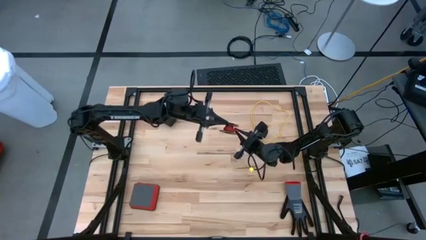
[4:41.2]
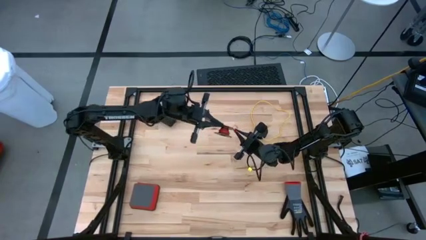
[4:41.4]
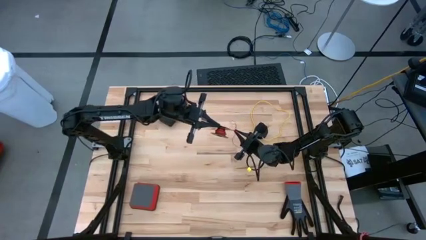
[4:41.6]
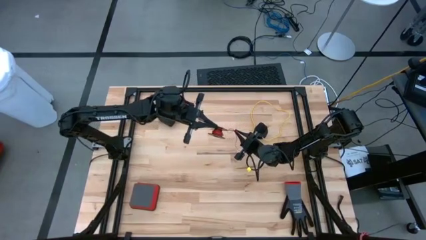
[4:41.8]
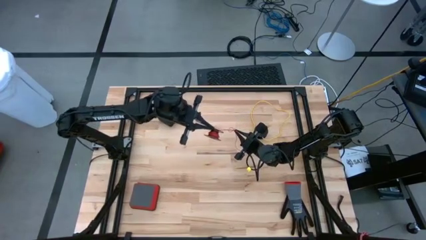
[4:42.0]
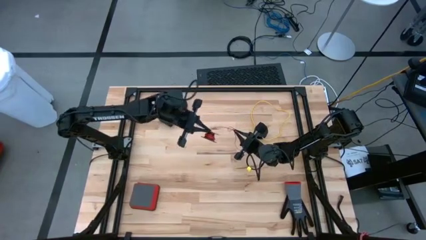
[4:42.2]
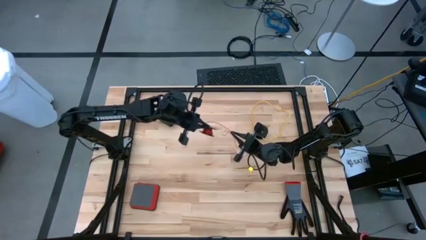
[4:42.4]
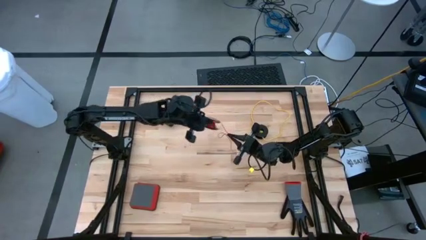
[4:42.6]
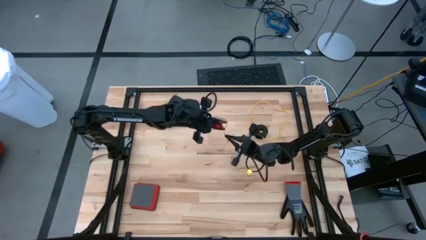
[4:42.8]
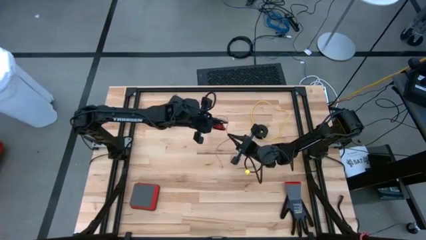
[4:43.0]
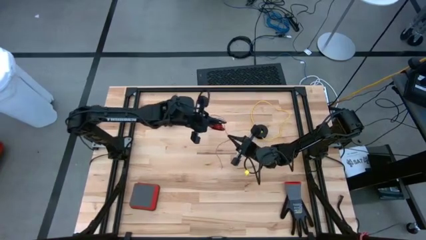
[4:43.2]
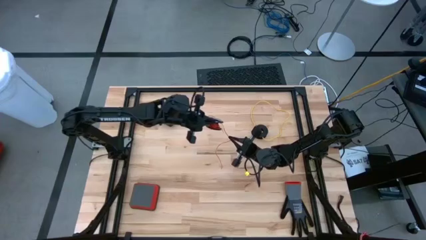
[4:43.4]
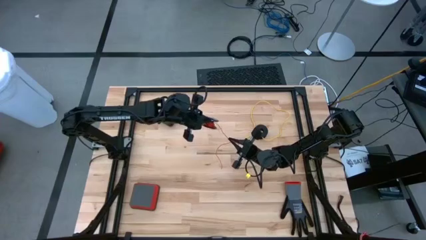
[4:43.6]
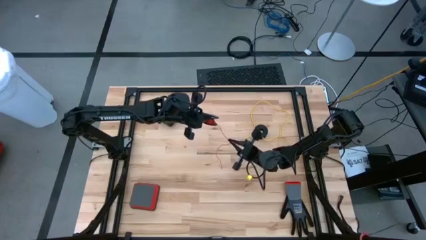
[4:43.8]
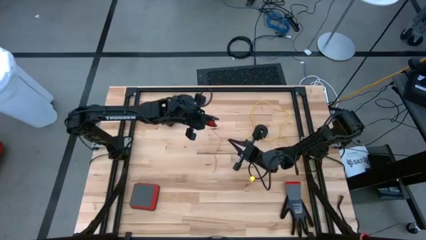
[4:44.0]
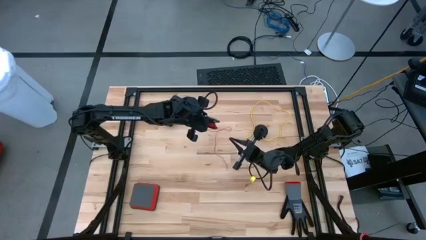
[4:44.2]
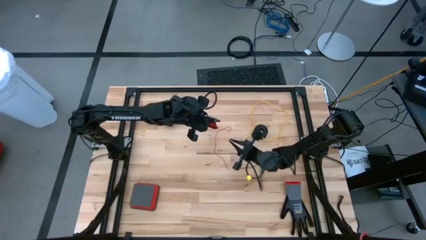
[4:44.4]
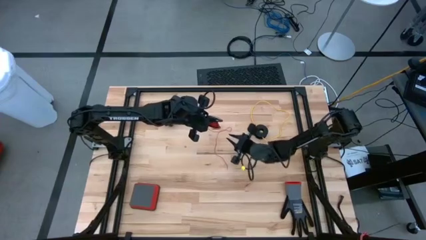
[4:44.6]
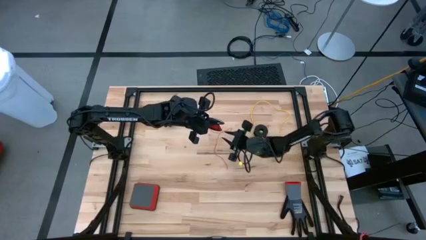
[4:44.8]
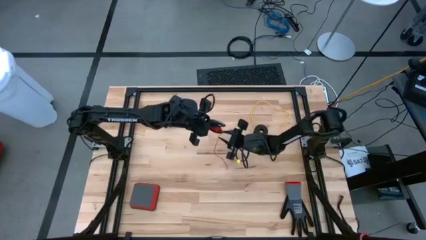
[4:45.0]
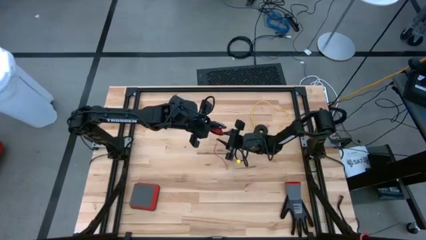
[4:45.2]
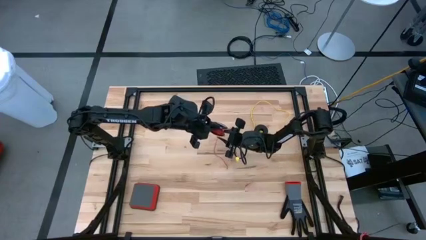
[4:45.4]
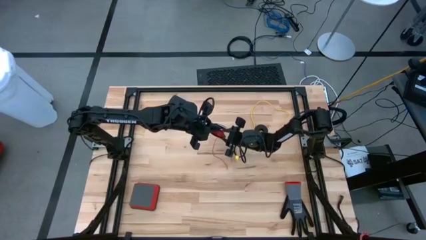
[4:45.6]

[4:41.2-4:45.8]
Task: Coil cords
Coil the red wire onto the black spool

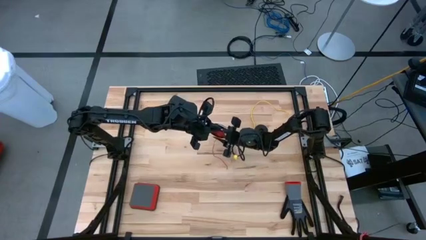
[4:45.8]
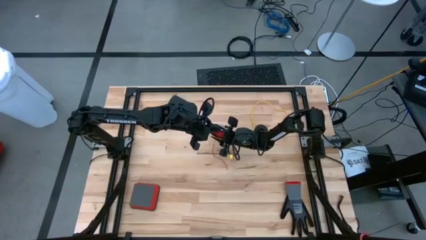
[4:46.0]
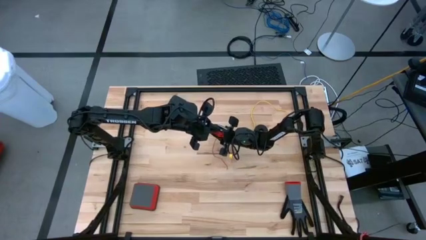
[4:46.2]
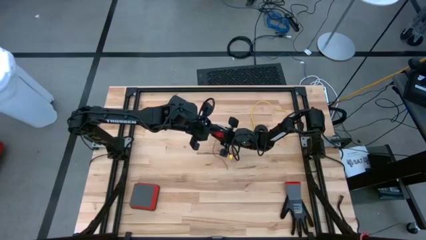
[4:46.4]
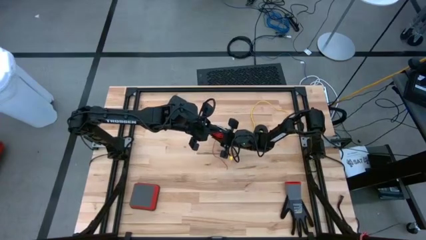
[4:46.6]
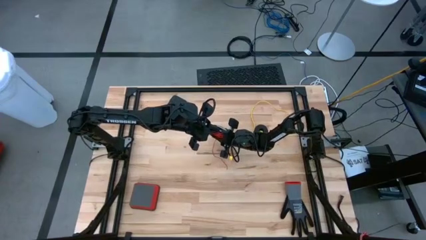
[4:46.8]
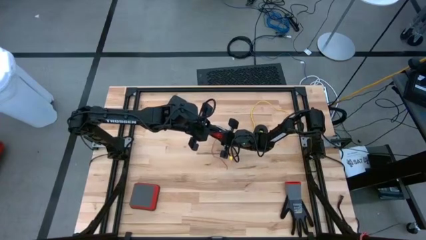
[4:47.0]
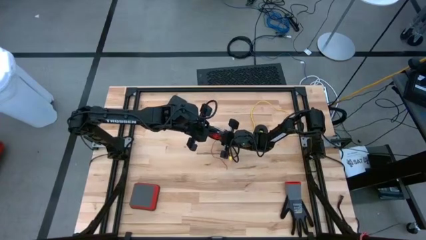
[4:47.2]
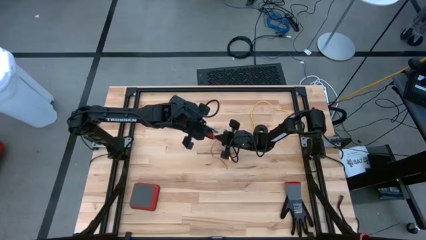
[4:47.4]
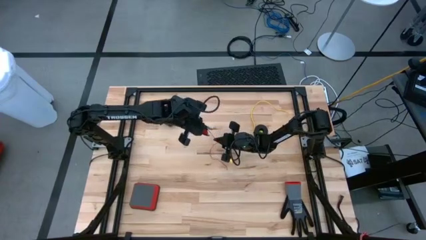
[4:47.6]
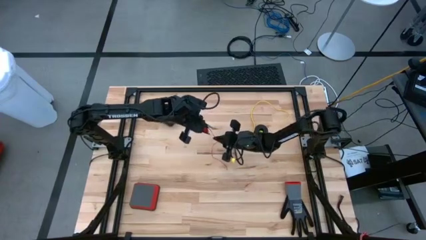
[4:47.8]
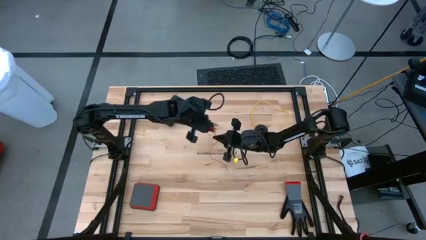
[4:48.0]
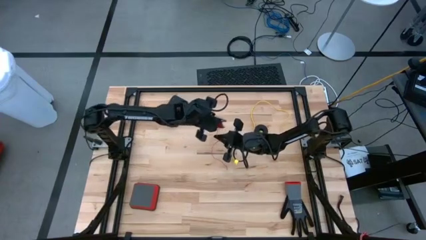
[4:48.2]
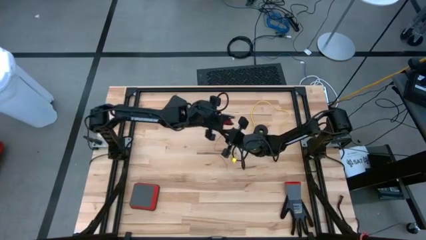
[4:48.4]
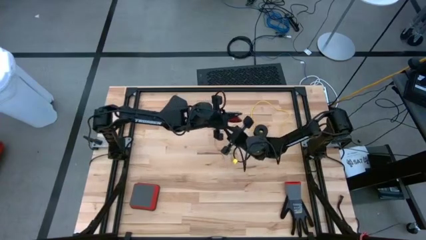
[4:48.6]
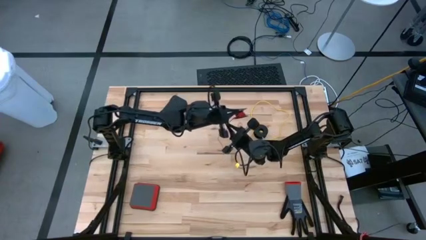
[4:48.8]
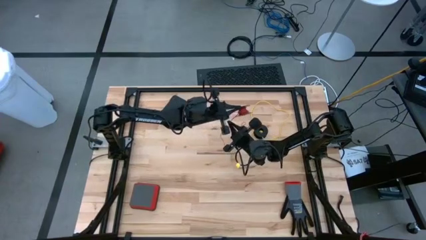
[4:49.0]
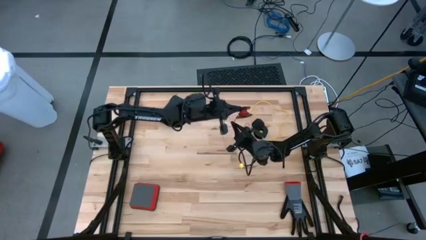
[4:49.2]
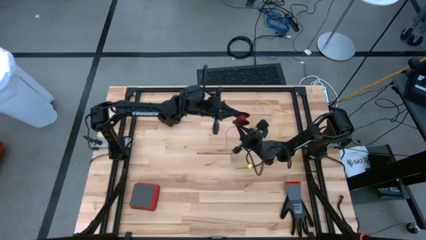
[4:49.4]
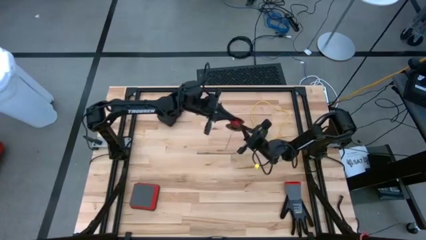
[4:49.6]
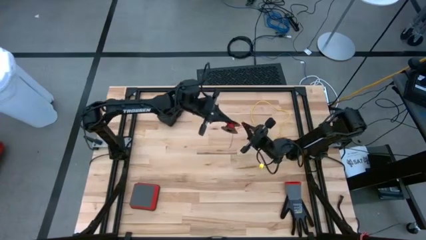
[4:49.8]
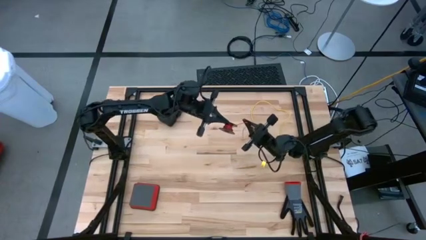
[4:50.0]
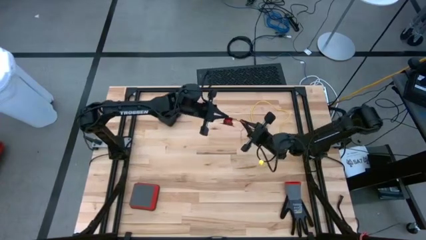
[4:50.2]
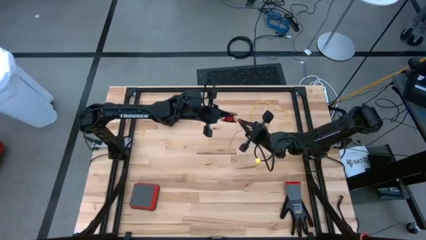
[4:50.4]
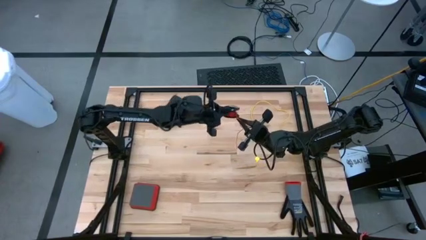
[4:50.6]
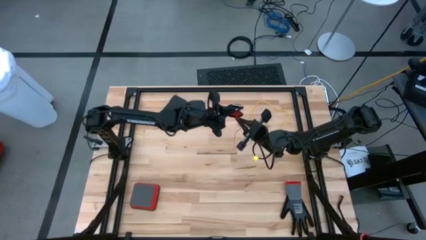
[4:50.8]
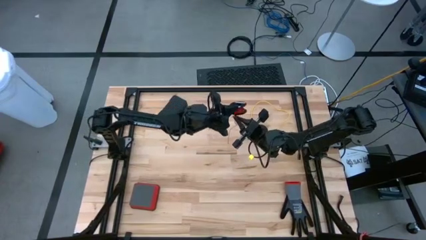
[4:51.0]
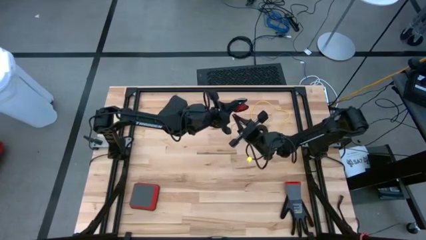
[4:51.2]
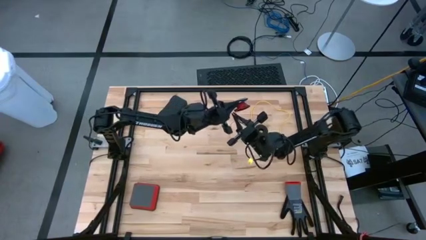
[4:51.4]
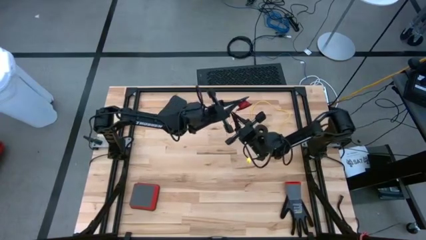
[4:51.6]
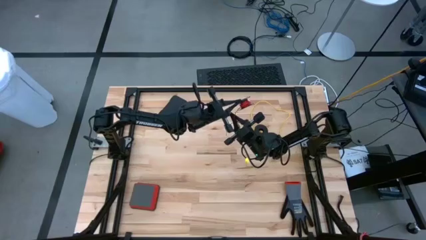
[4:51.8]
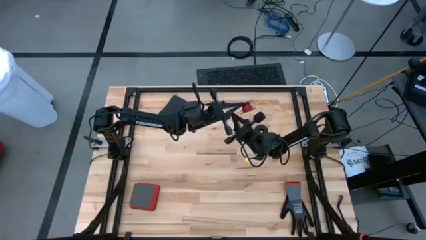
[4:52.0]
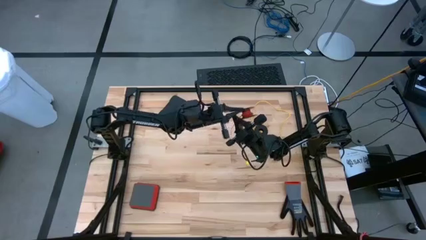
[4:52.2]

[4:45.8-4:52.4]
Coil the red wire onto the black spool
